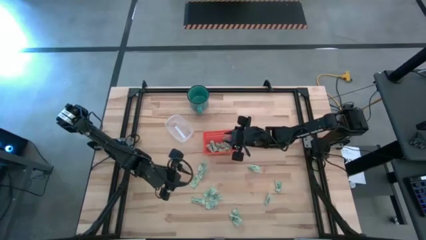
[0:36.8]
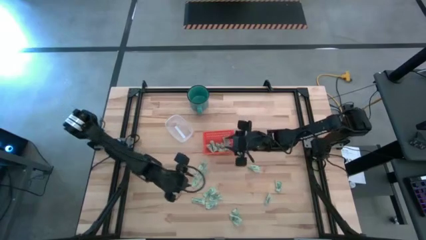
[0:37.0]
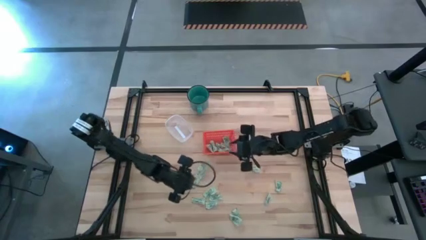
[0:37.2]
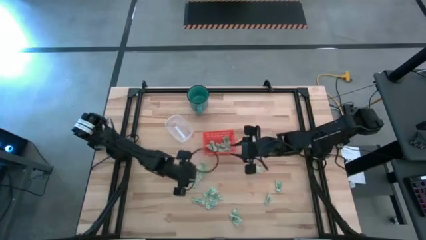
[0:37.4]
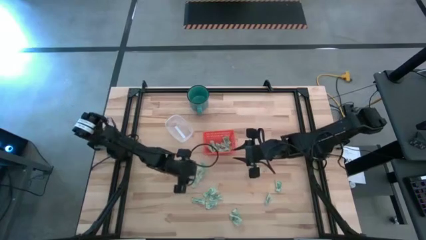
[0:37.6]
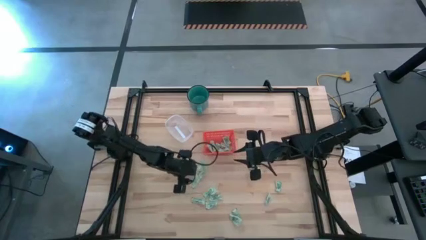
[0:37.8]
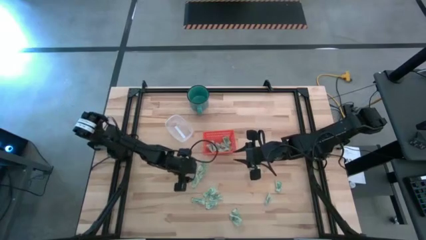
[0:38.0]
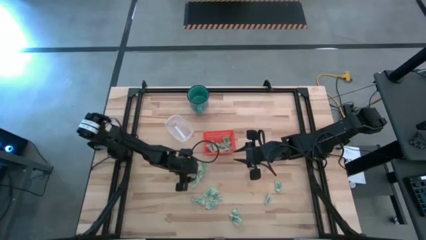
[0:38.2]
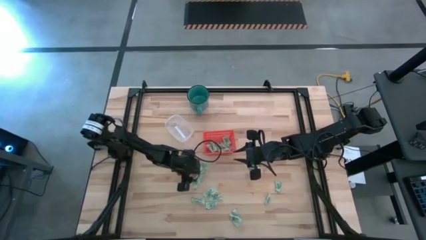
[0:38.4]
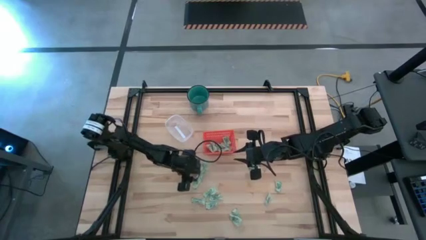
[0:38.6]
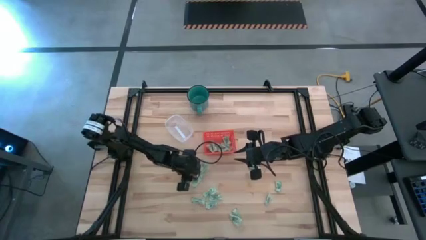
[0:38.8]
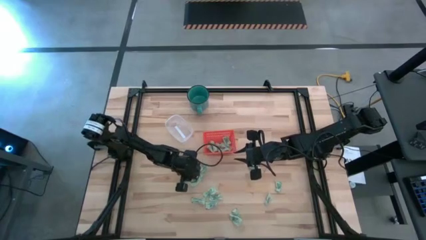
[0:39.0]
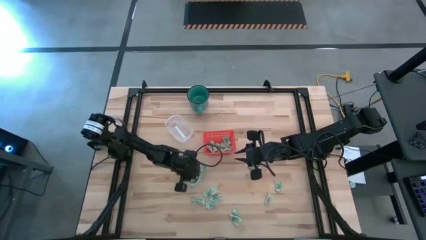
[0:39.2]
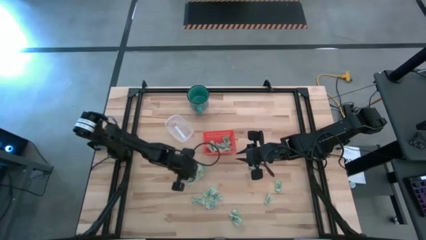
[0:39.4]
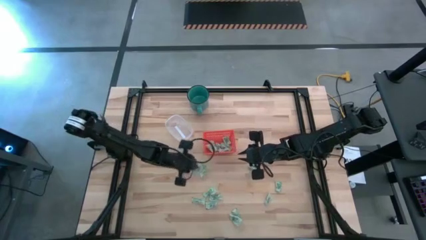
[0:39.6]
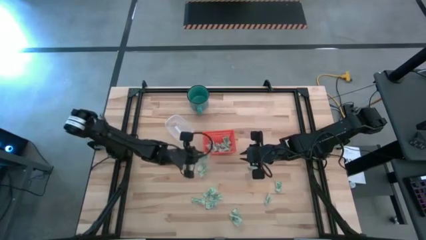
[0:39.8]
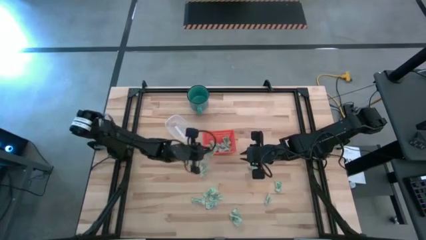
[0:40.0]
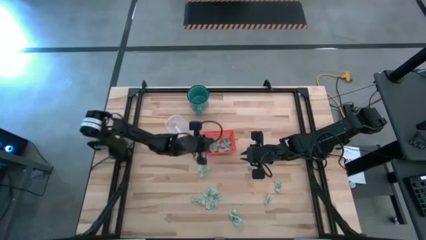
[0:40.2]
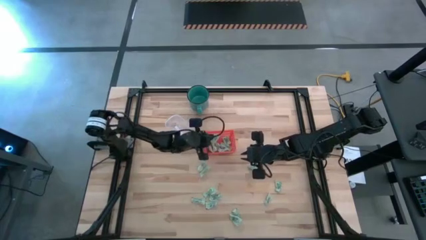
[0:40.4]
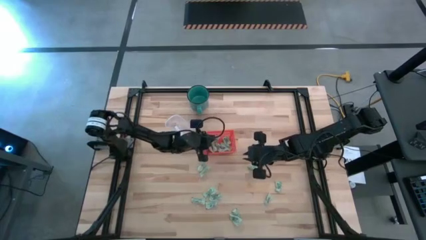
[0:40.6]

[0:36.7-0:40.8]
Task: Pick and place items into bin
Put the stevia packet into the orange bin

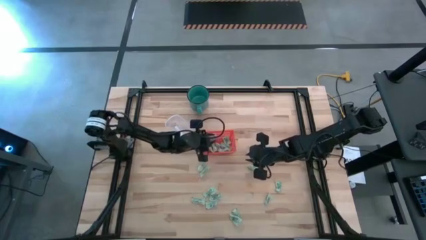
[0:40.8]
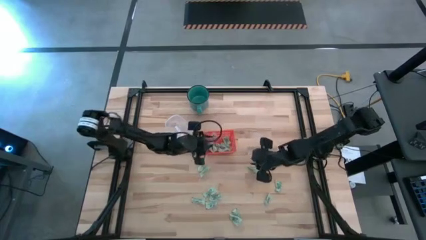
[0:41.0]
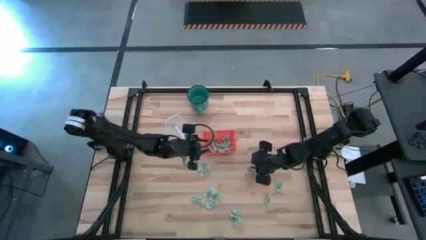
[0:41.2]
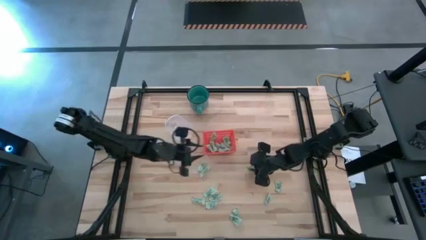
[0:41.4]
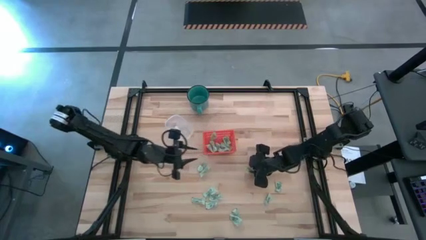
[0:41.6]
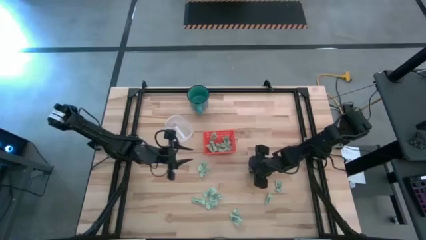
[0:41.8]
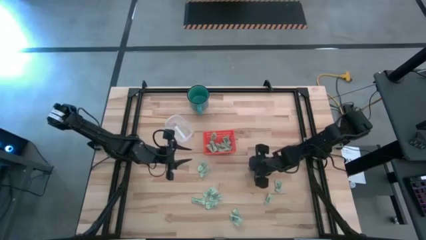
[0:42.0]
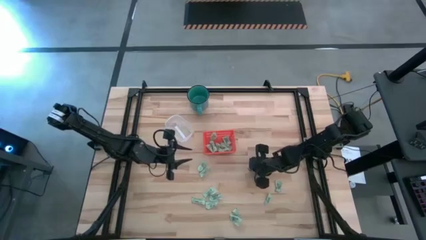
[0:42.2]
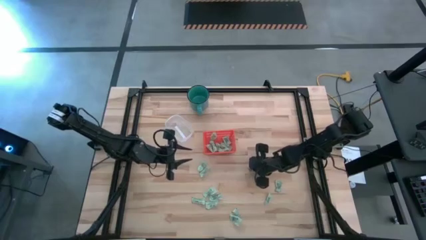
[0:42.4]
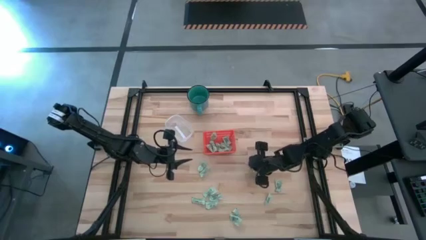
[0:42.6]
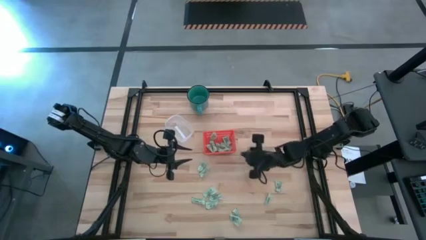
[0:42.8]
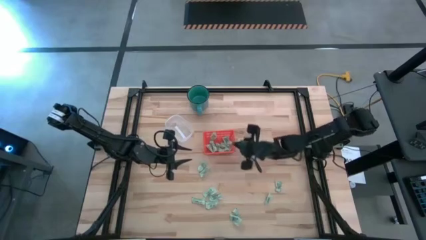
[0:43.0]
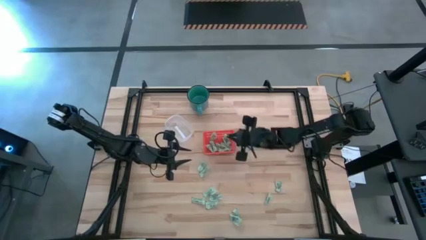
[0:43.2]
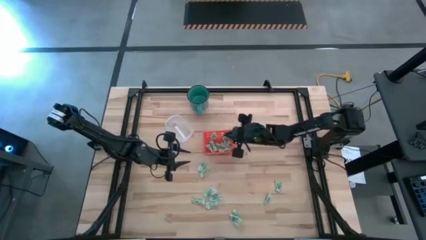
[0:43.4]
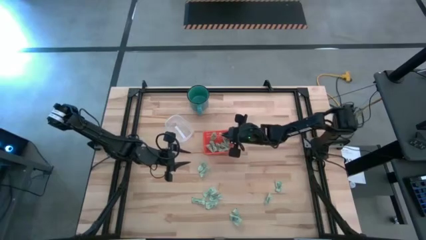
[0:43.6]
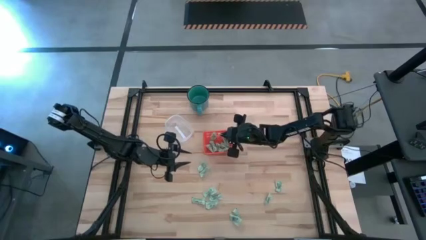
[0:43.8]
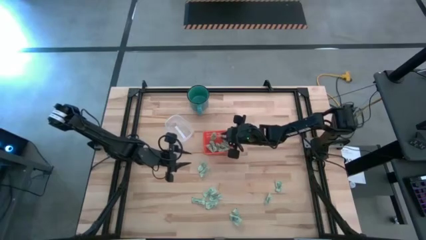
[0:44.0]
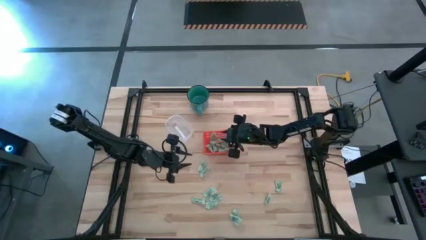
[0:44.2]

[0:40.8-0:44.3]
Put the stevia packet into the orange bin

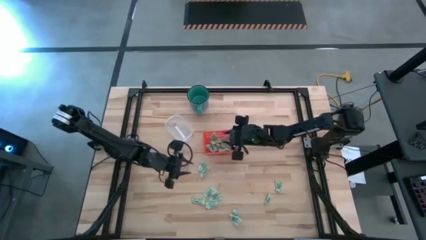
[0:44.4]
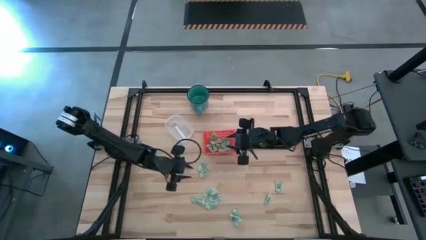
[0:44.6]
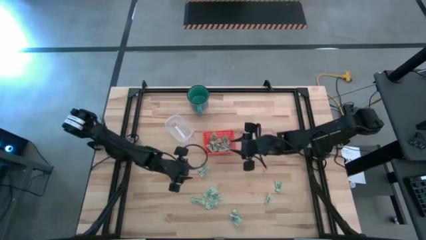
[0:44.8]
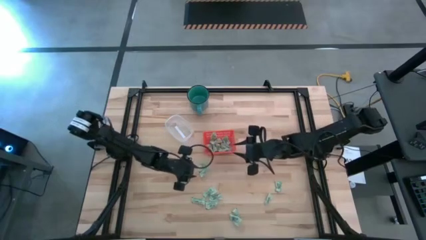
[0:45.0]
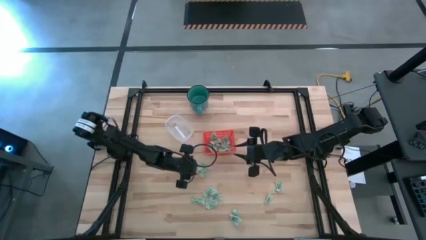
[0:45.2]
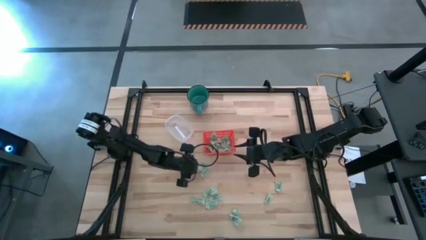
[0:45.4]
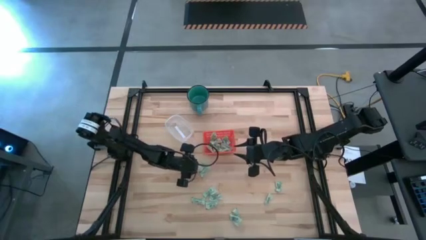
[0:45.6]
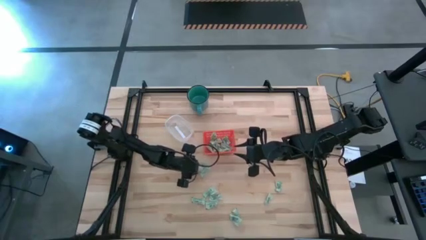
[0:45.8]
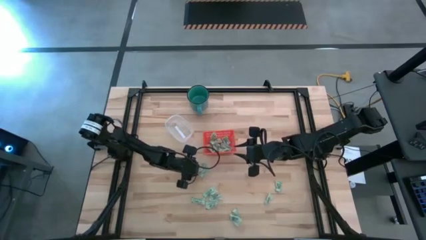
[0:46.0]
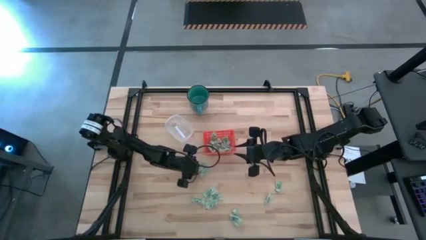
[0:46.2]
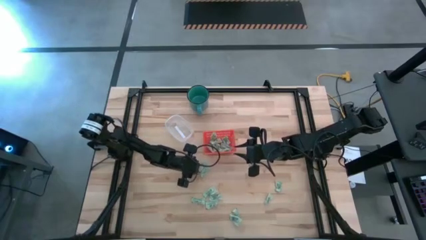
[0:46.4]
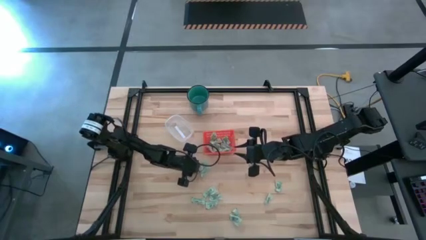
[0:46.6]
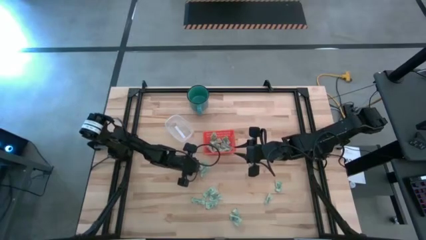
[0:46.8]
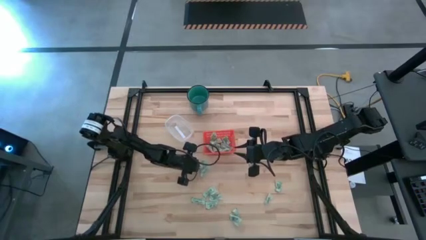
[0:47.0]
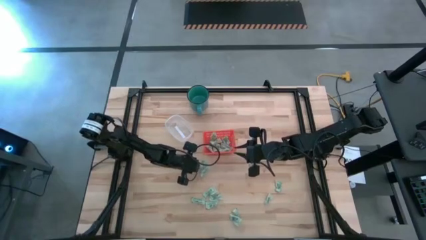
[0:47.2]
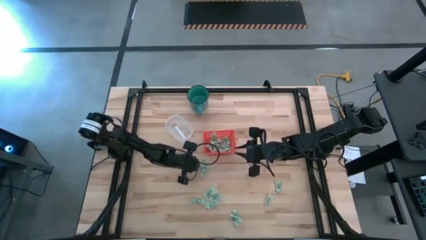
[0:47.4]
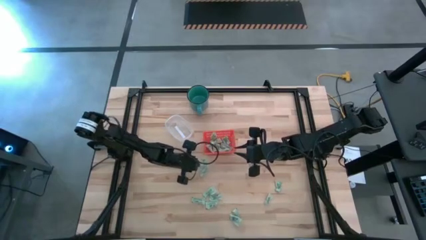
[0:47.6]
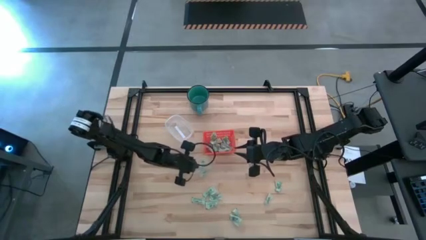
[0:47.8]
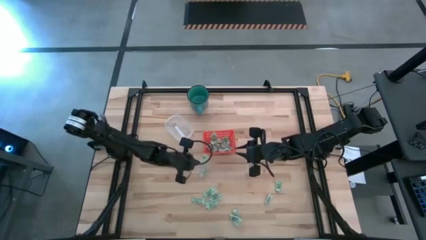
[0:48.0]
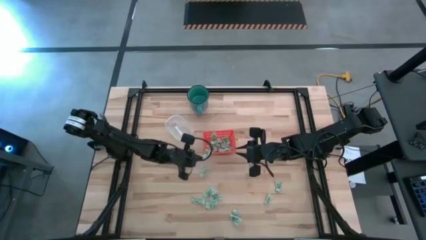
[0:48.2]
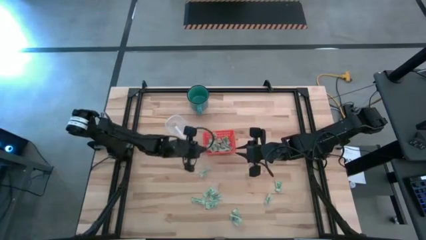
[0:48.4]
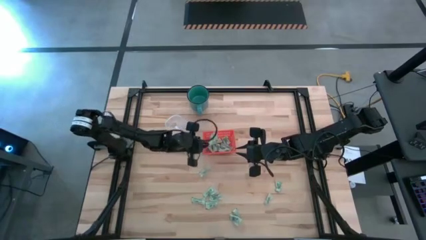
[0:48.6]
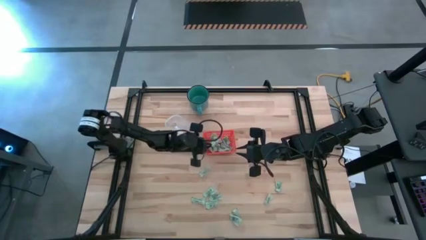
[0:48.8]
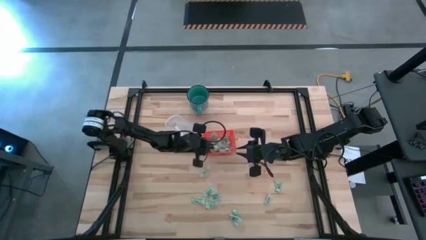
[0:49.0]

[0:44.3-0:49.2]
Put the stevia packet into the orange bin

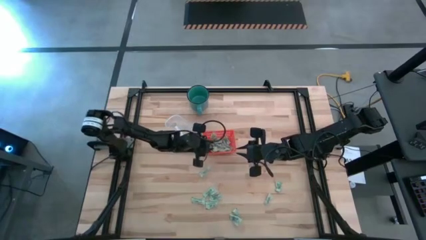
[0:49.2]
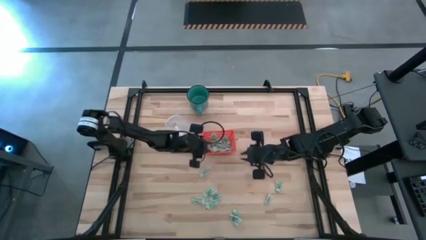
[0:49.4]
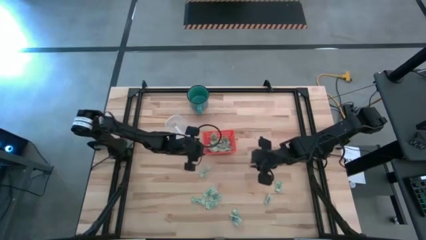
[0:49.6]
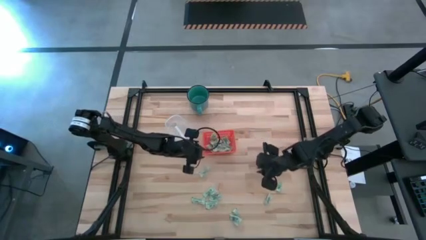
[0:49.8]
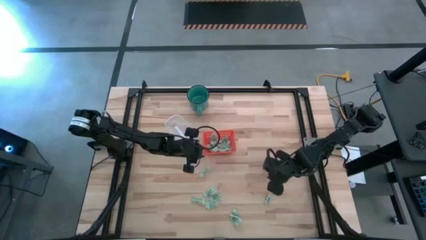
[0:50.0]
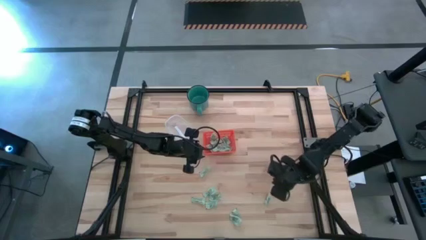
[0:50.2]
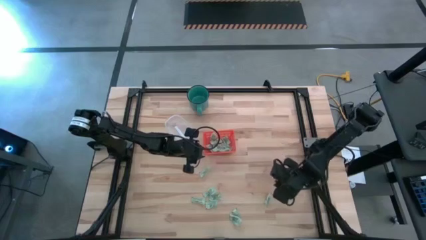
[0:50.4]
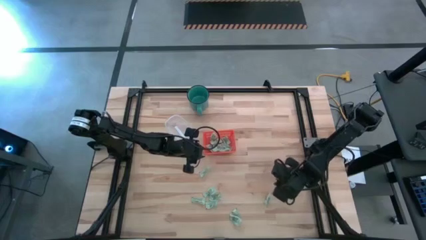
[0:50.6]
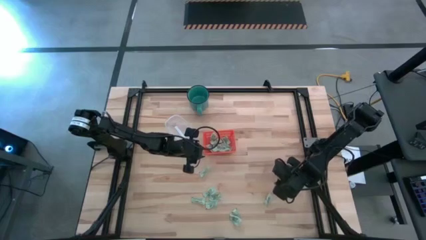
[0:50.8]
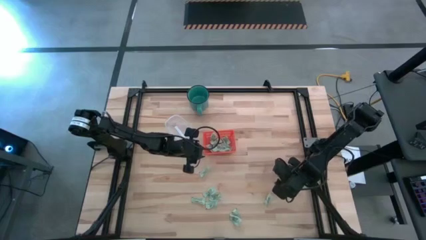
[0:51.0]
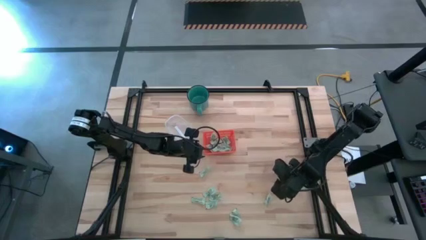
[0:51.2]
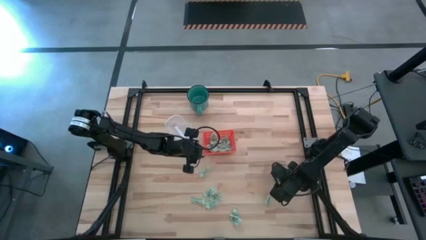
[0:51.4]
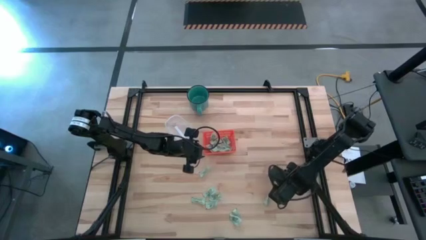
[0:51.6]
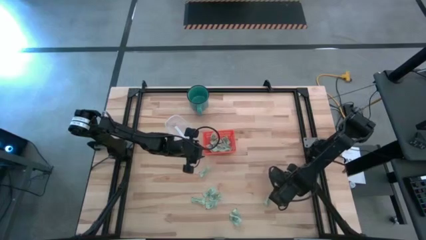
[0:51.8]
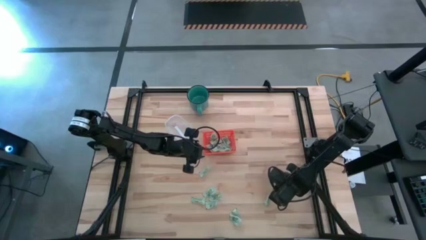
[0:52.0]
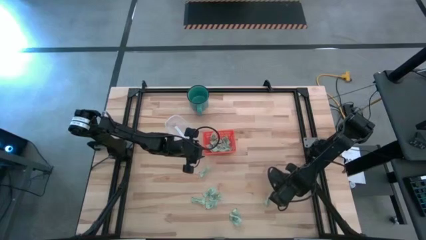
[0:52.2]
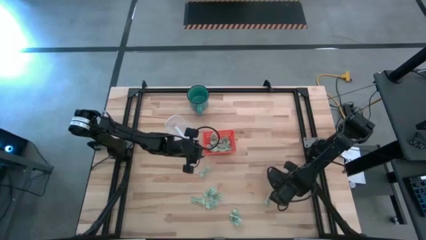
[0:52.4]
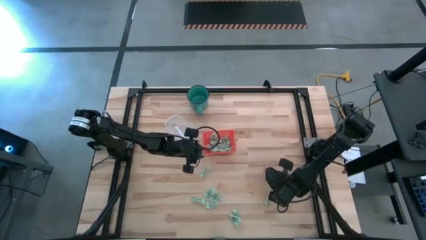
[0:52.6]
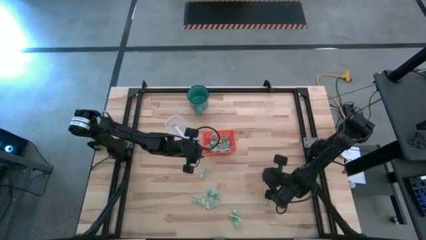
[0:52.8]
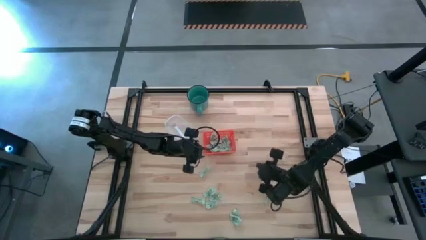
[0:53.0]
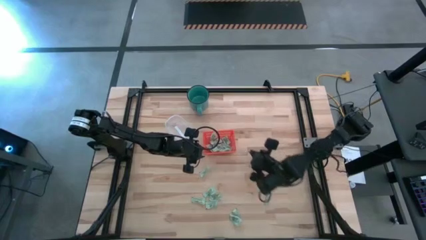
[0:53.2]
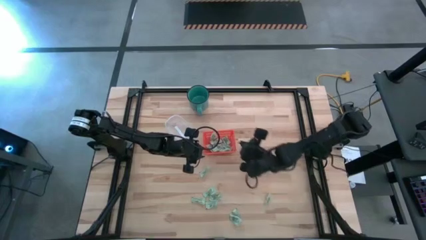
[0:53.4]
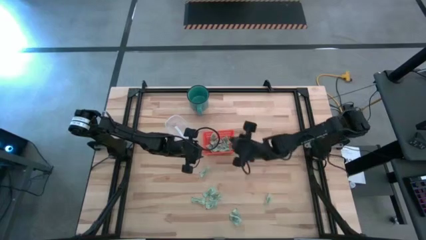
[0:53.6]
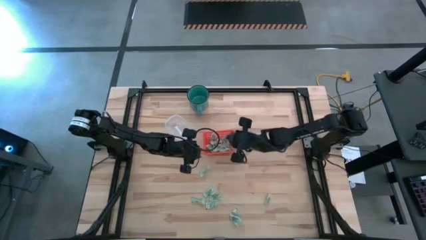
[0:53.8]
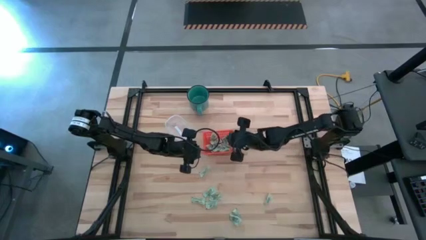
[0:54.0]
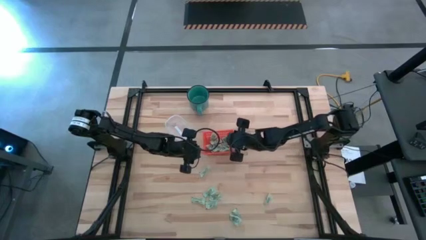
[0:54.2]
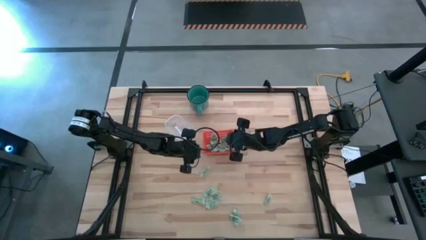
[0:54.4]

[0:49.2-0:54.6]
Put the stevia packet into the orange bin
